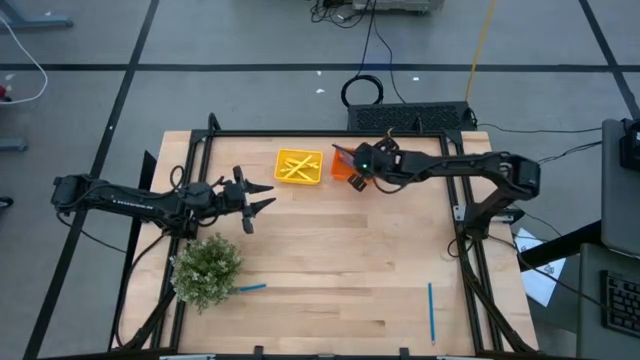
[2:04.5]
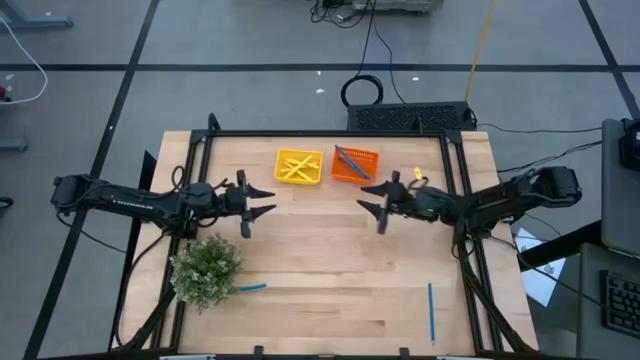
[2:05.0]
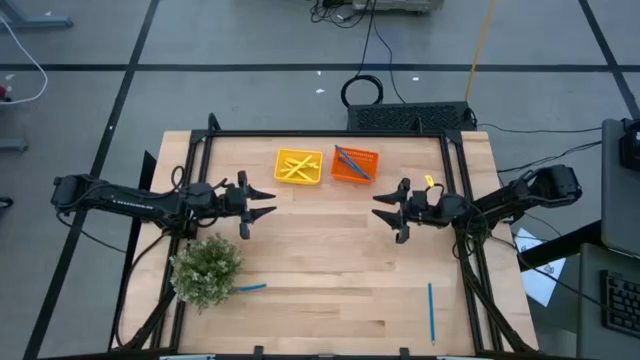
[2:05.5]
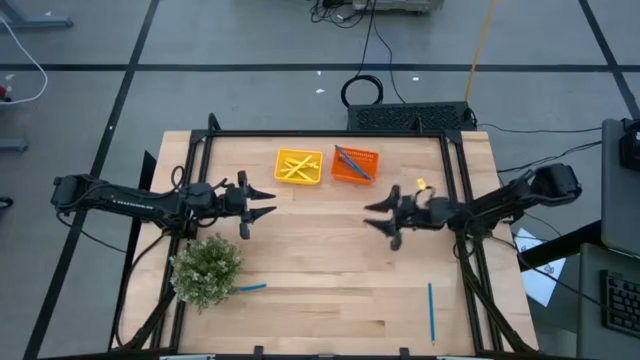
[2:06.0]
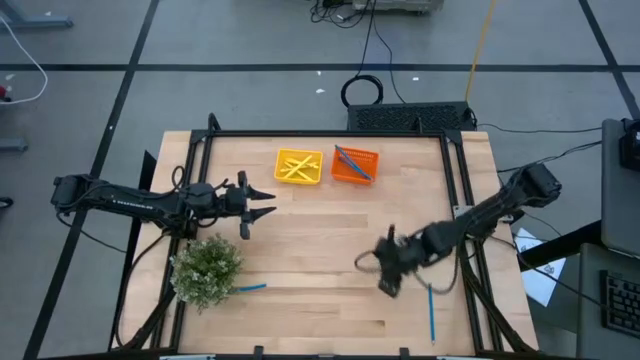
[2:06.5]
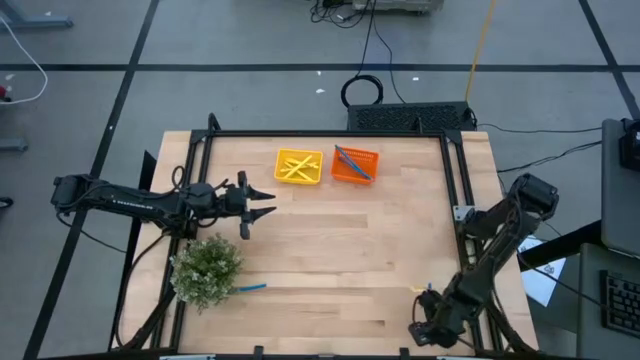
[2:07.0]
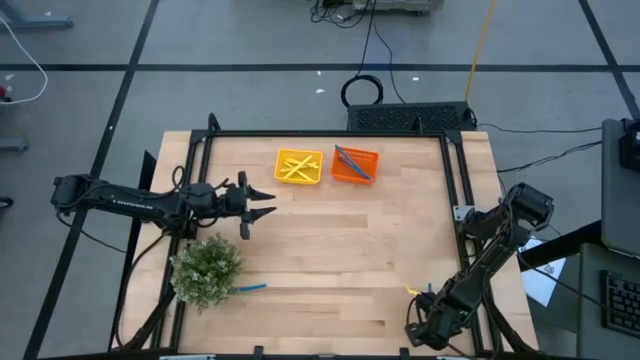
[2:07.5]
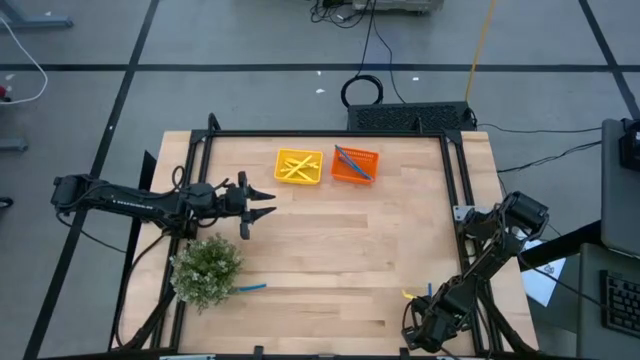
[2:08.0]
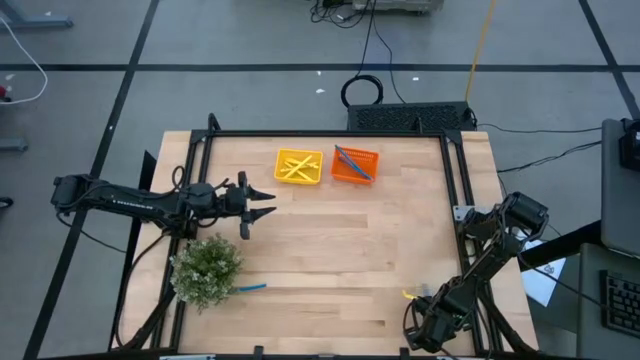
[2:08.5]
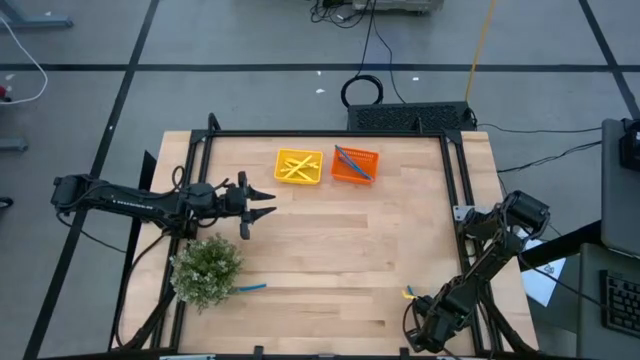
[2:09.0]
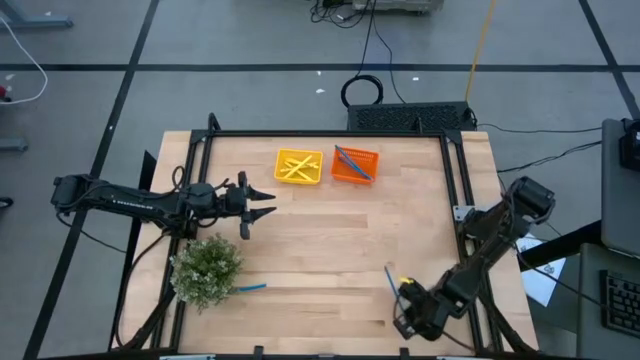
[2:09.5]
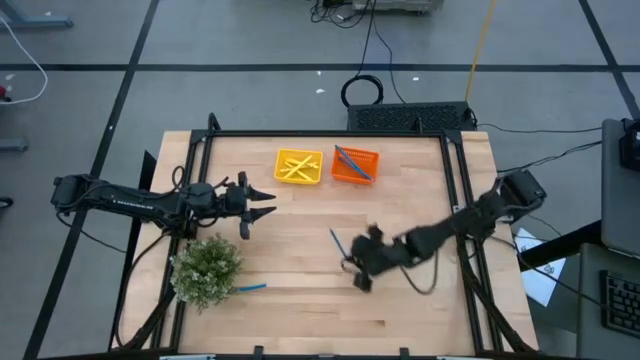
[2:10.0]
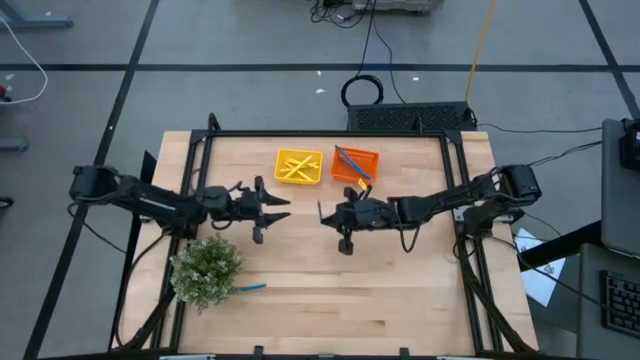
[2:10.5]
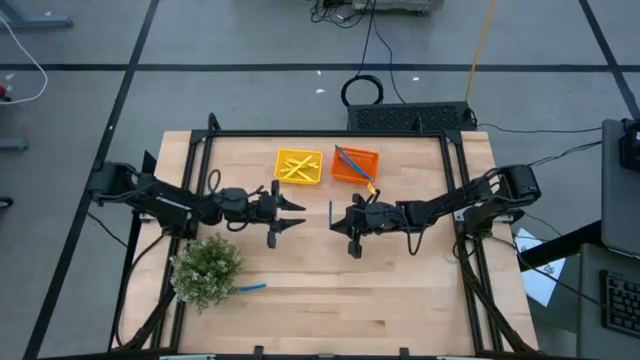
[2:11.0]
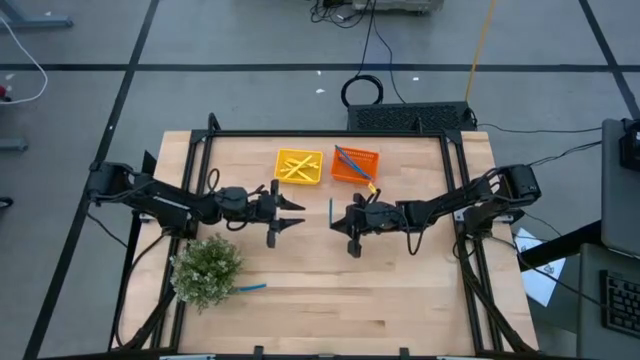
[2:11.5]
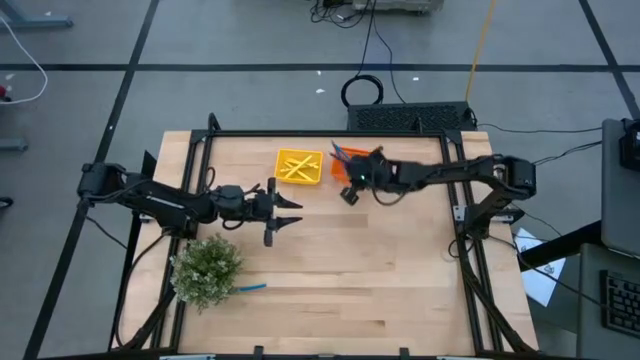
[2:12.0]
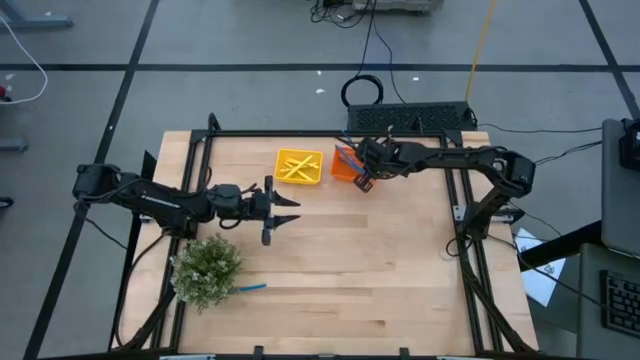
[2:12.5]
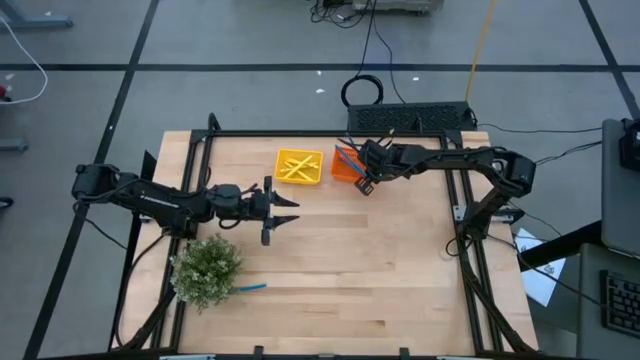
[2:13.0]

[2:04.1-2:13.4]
Task: Sort pens & pencils
Put the right blue pencil into the orange bin

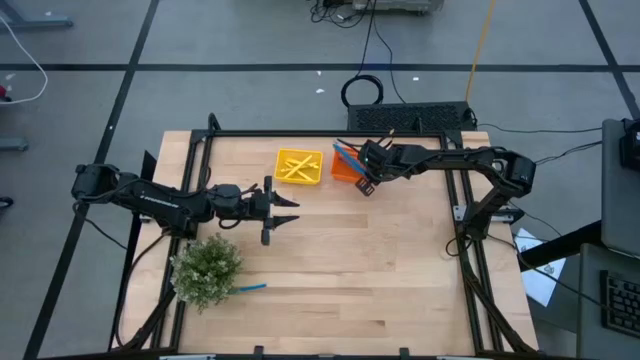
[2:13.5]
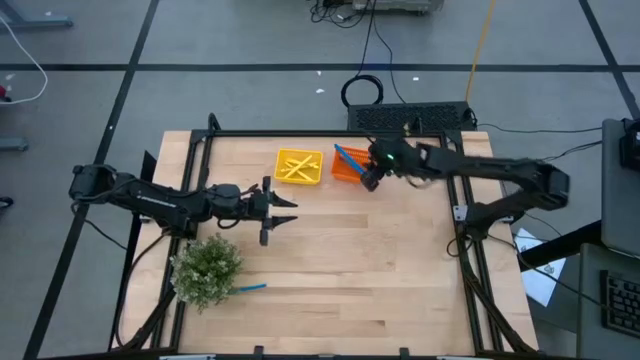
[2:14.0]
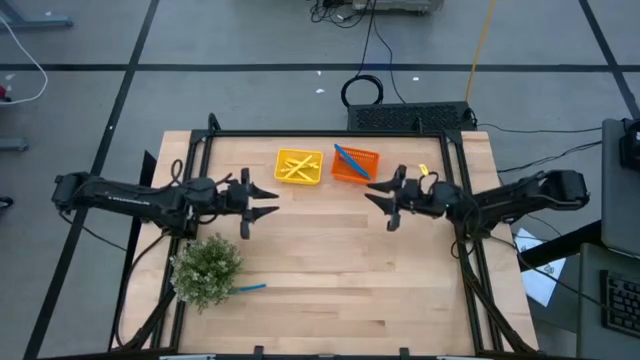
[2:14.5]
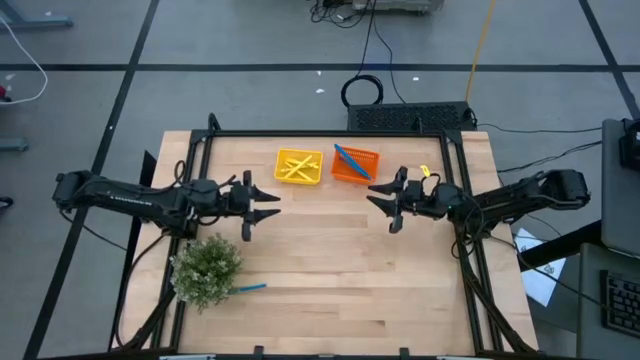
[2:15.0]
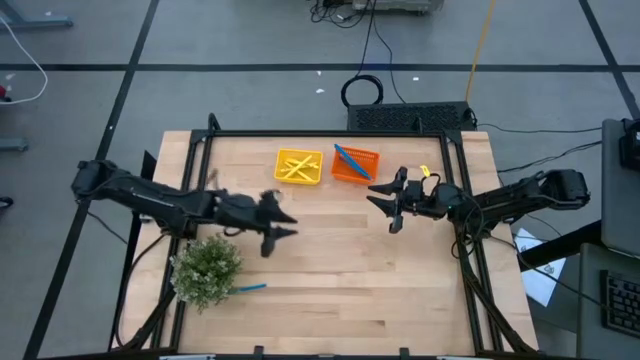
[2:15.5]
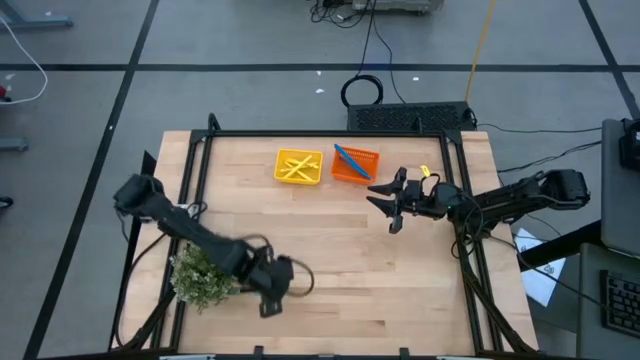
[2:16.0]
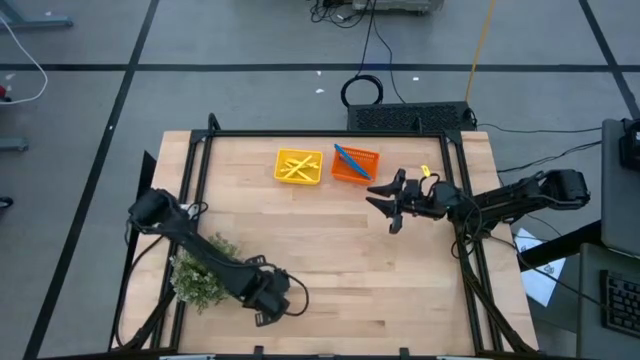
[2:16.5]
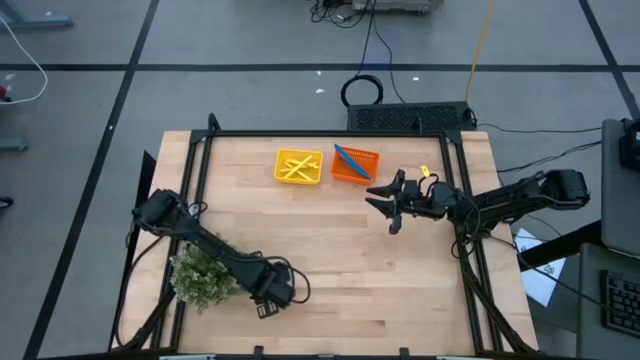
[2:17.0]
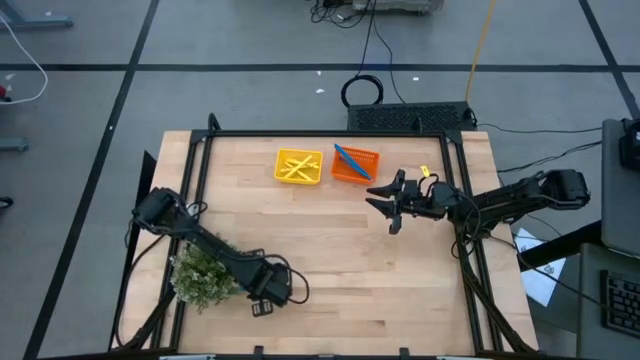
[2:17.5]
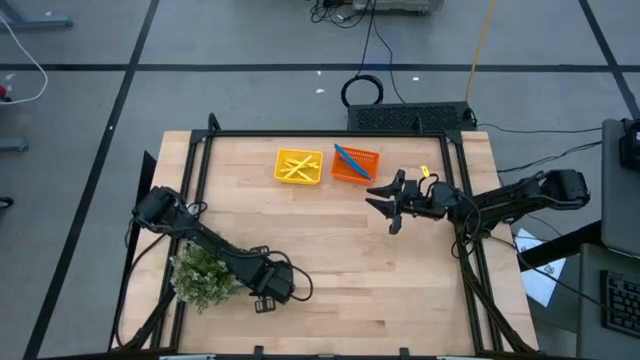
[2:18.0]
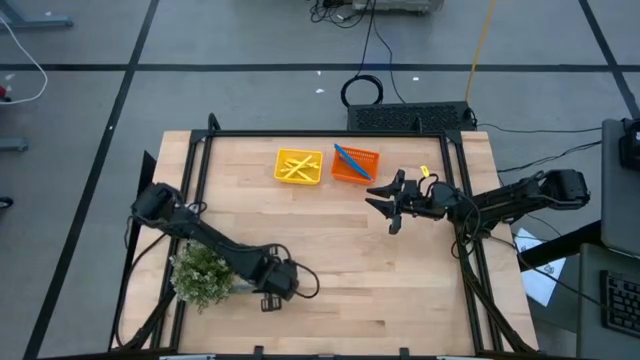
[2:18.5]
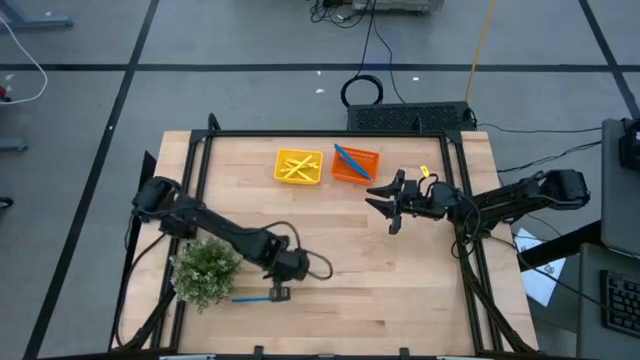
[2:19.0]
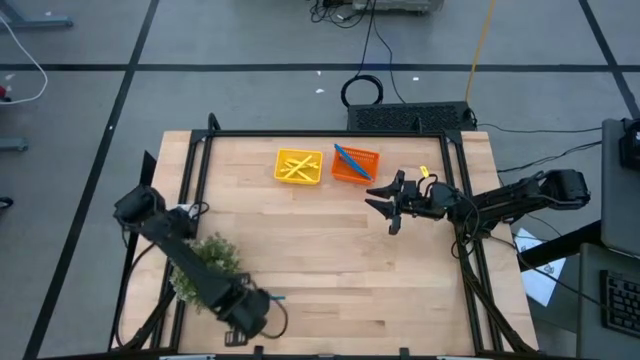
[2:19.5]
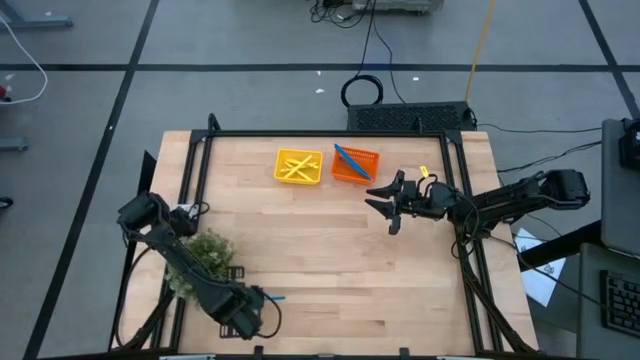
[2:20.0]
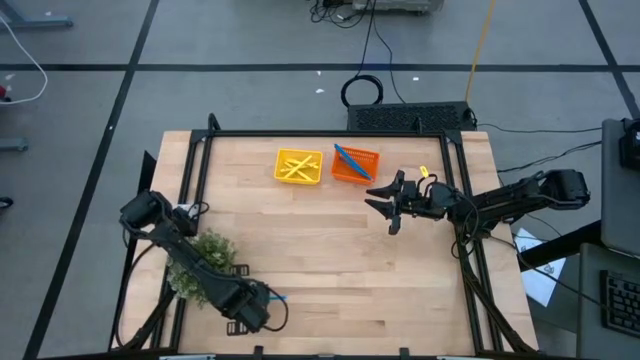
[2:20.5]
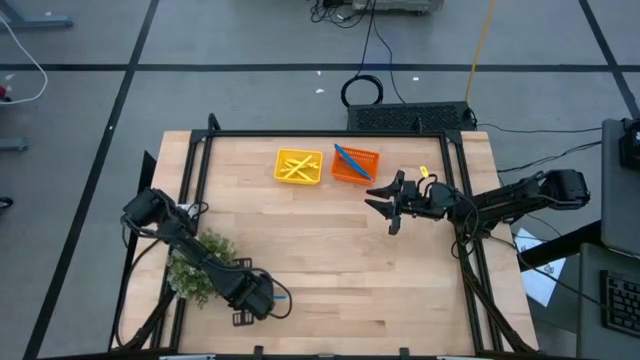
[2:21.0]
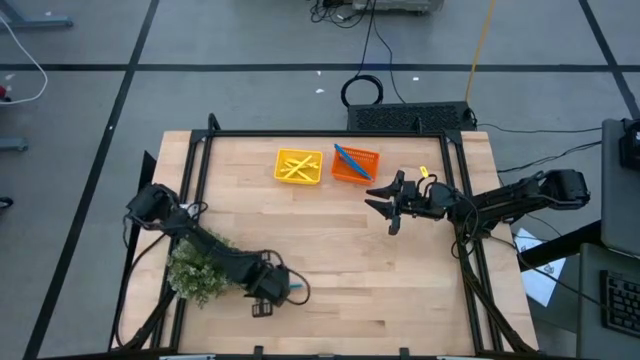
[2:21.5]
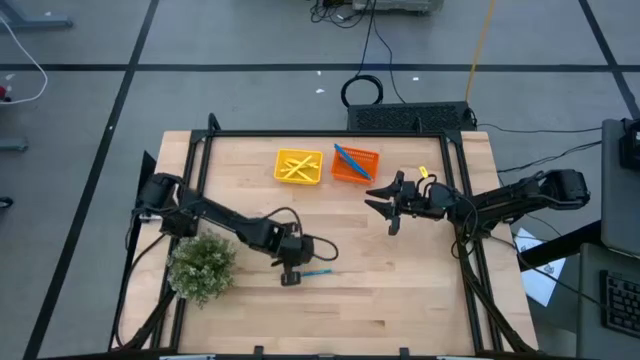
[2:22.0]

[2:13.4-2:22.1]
Put the blue pencil into the orange bin

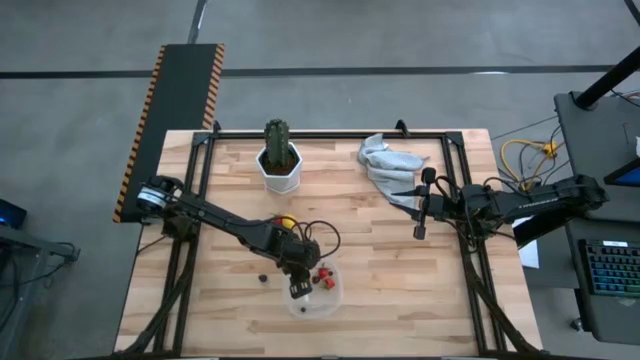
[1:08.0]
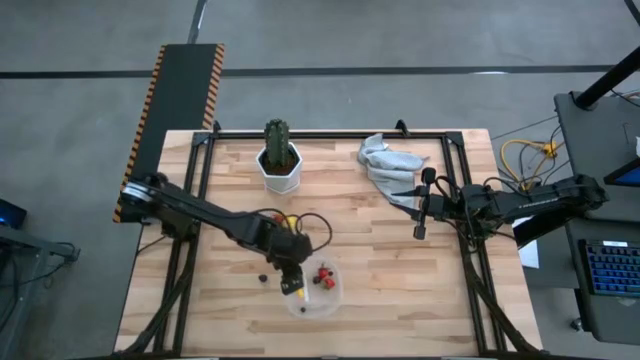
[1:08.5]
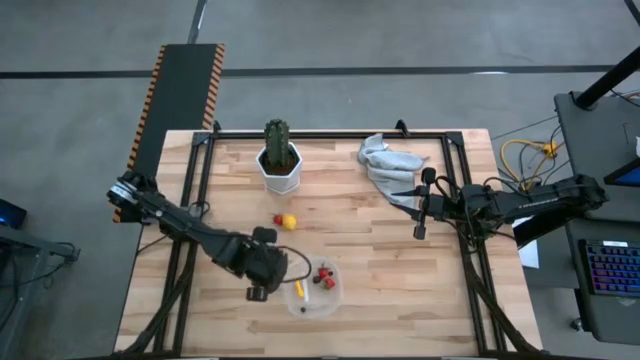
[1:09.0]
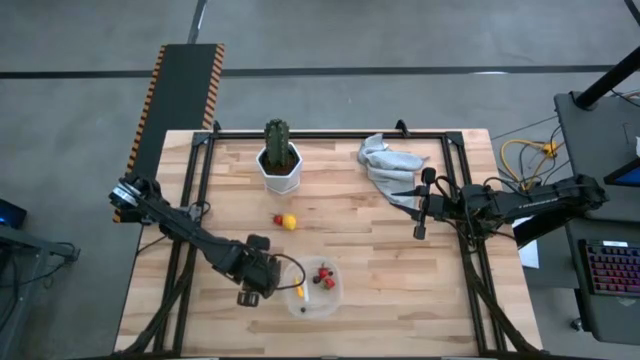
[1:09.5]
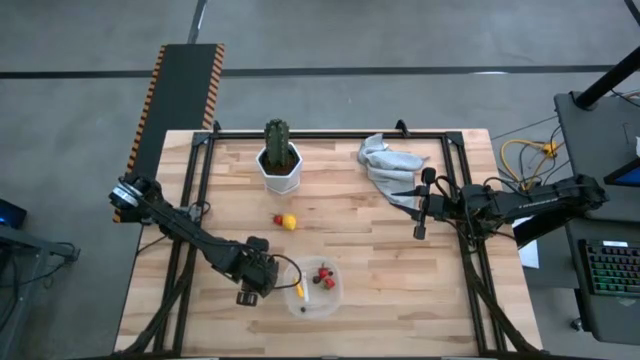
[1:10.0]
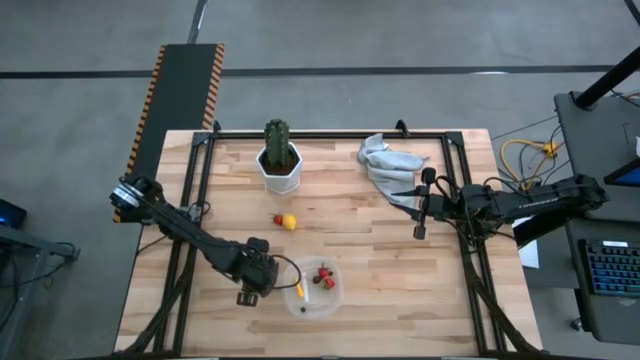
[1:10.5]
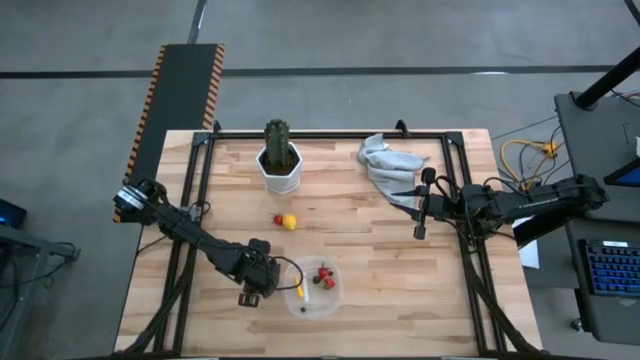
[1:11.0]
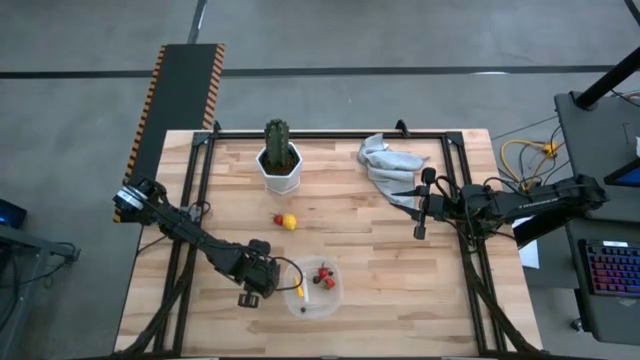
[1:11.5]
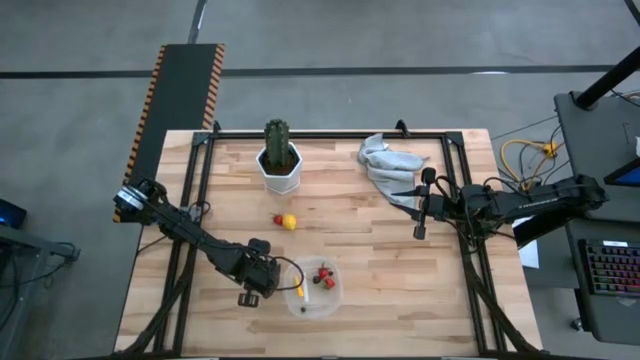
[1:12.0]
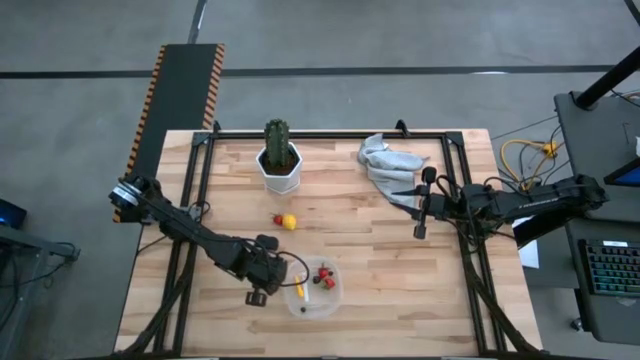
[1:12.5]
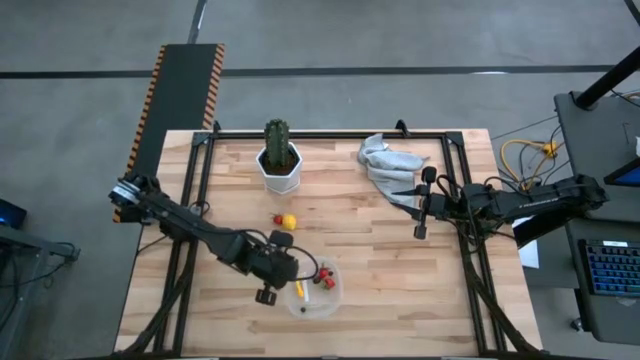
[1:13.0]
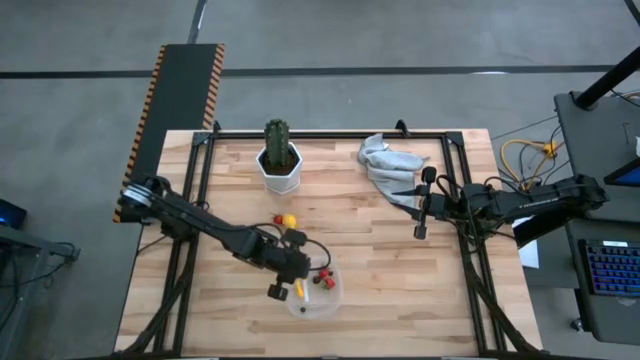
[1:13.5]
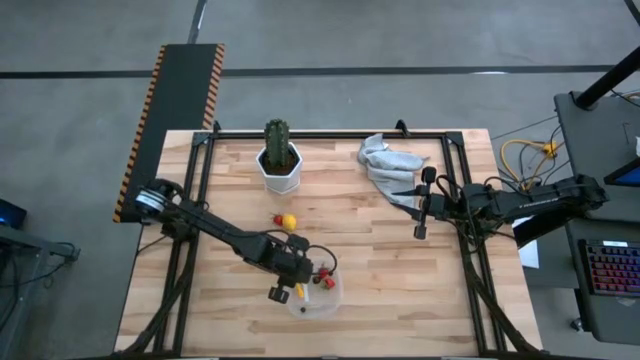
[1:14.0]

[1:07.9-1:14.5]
Task: Pick and placing Produce into tupperware
Put the blackberry into the transparent container
